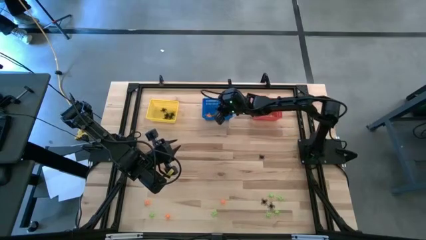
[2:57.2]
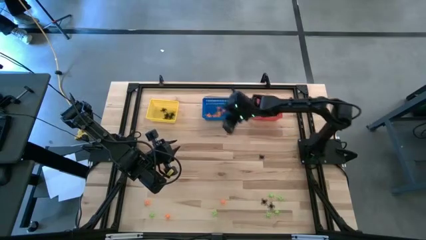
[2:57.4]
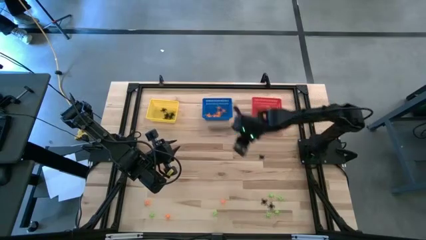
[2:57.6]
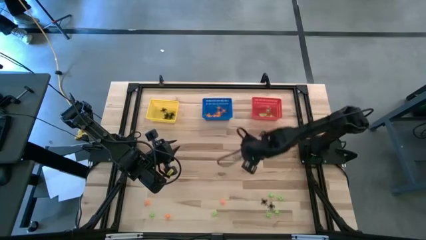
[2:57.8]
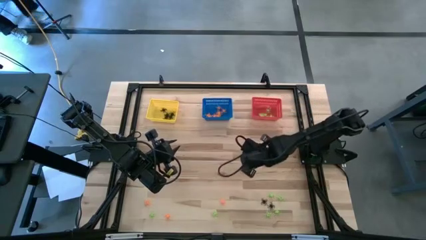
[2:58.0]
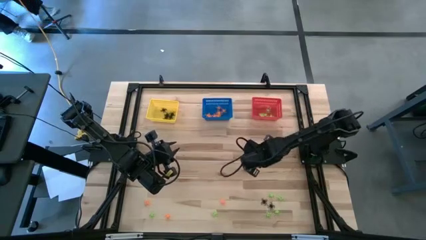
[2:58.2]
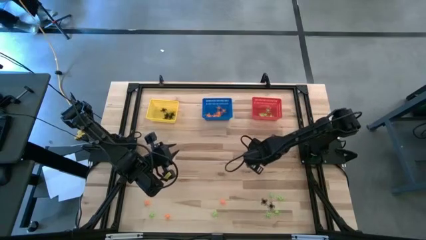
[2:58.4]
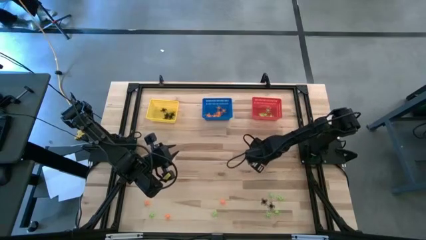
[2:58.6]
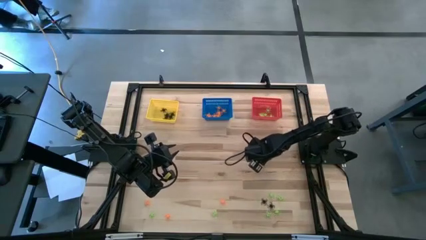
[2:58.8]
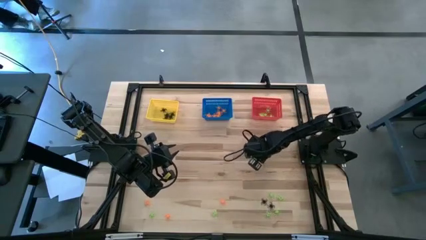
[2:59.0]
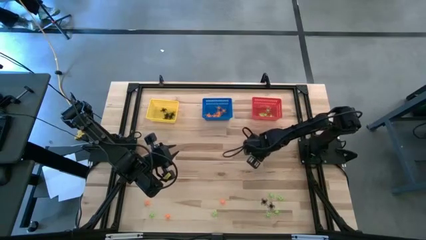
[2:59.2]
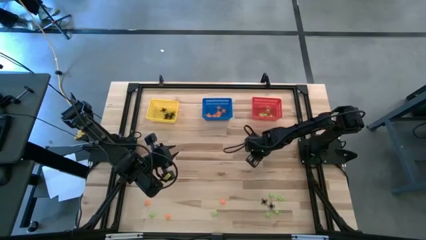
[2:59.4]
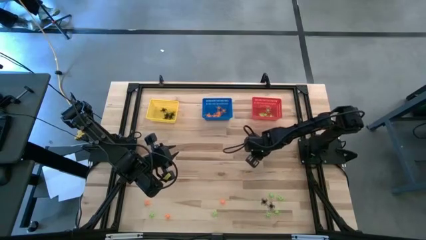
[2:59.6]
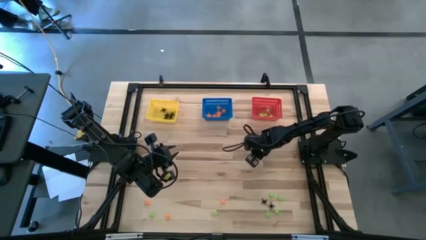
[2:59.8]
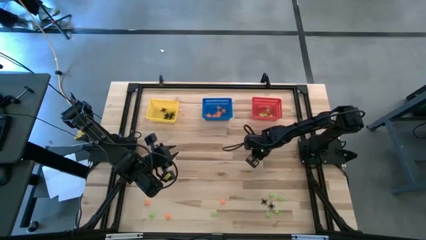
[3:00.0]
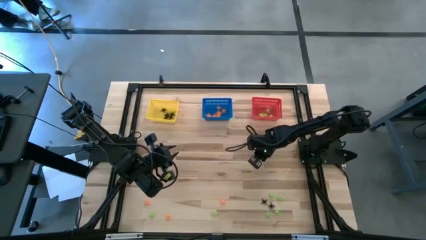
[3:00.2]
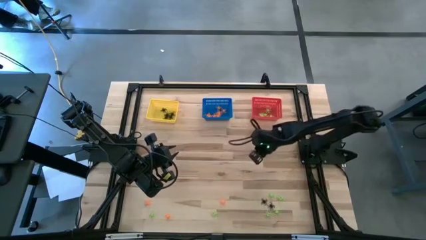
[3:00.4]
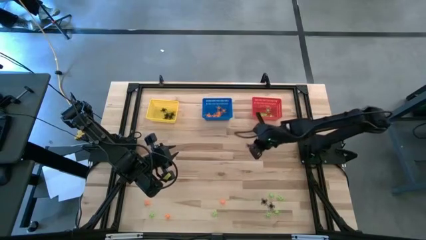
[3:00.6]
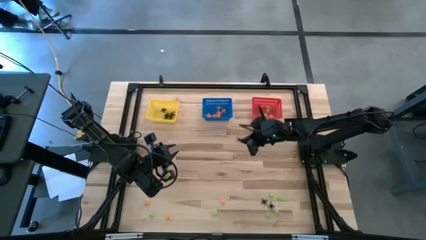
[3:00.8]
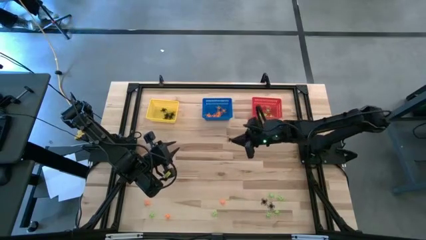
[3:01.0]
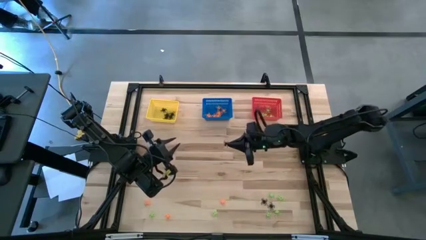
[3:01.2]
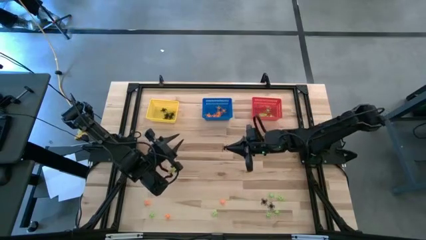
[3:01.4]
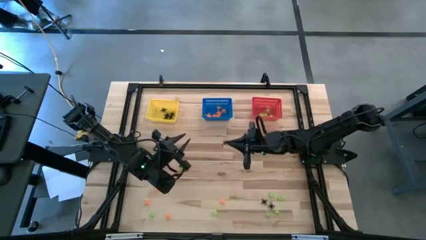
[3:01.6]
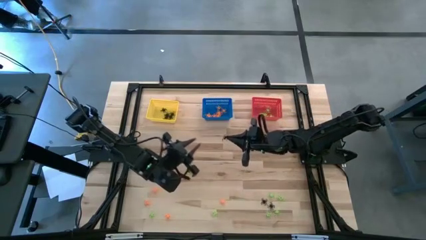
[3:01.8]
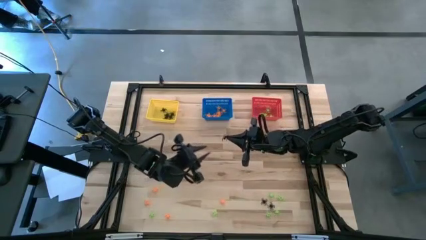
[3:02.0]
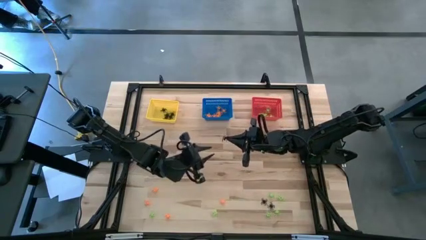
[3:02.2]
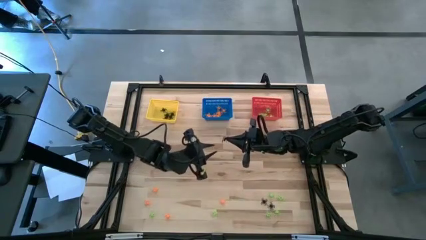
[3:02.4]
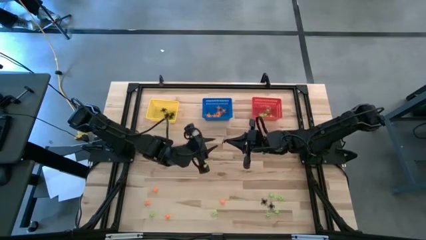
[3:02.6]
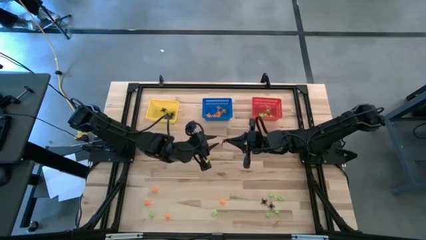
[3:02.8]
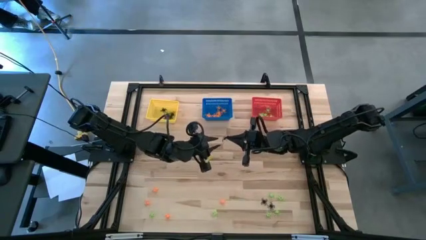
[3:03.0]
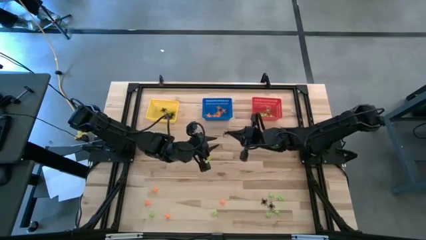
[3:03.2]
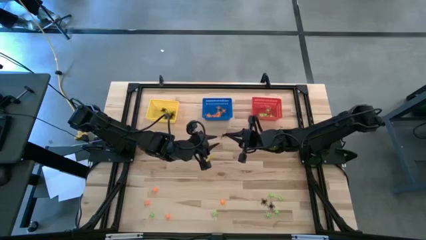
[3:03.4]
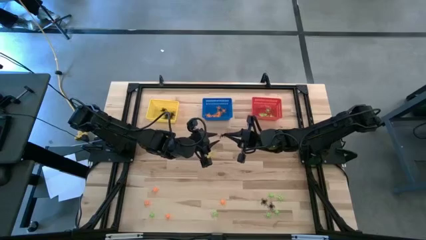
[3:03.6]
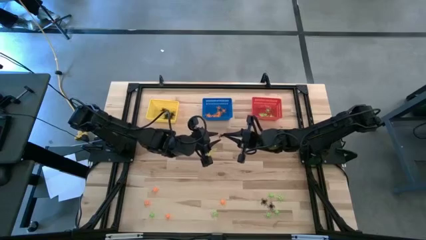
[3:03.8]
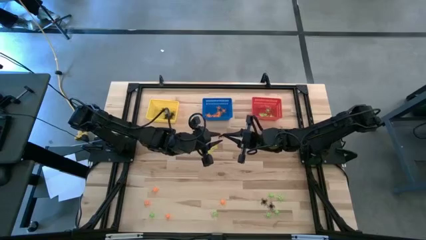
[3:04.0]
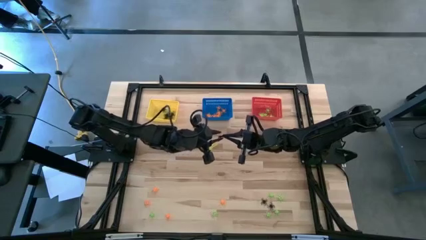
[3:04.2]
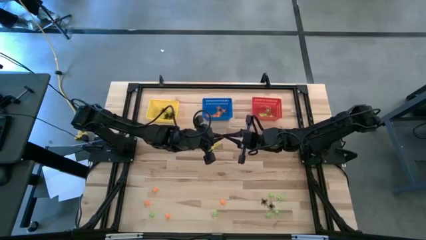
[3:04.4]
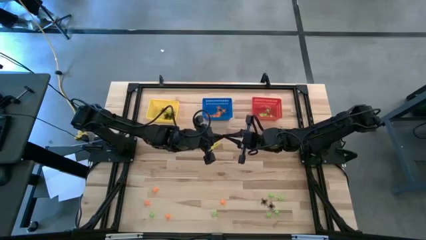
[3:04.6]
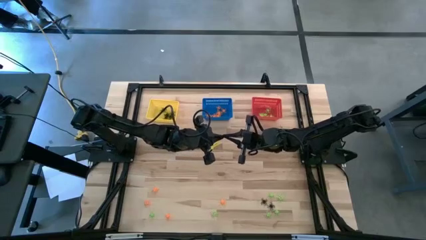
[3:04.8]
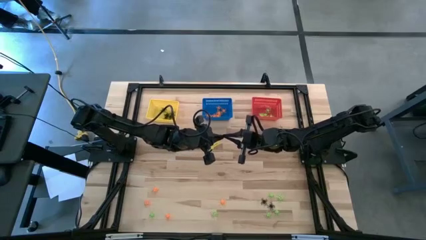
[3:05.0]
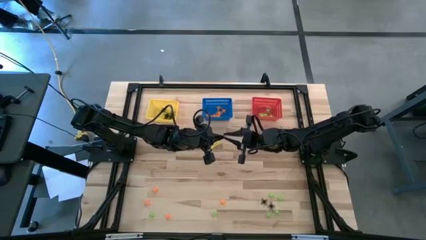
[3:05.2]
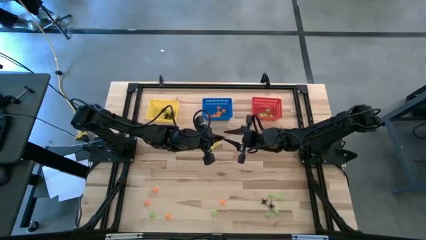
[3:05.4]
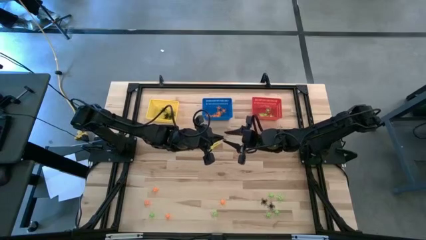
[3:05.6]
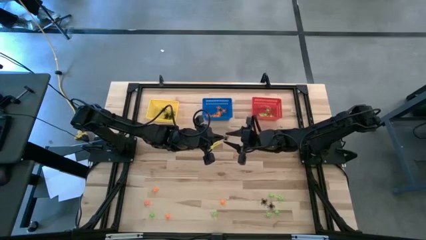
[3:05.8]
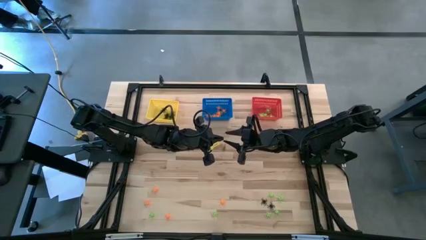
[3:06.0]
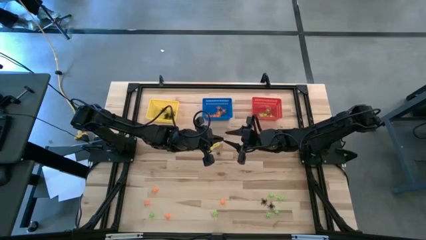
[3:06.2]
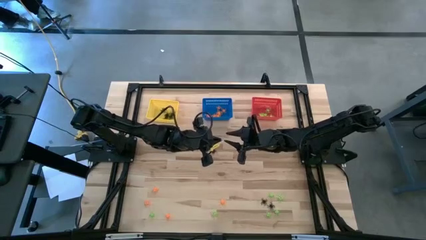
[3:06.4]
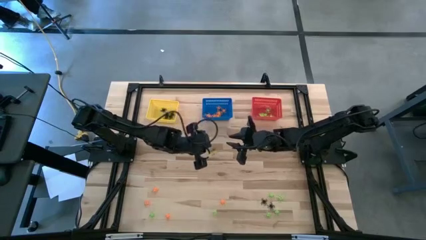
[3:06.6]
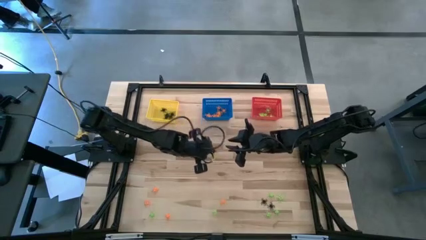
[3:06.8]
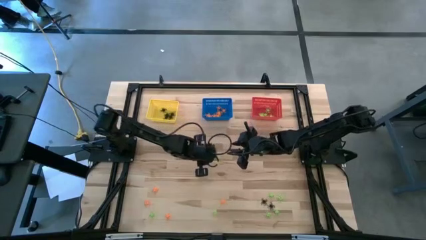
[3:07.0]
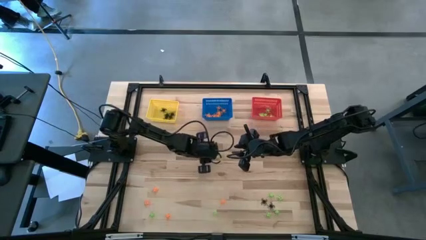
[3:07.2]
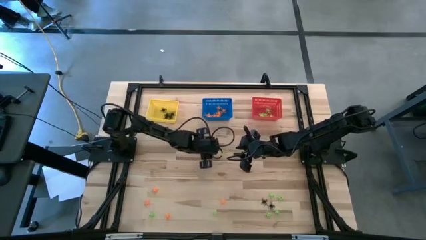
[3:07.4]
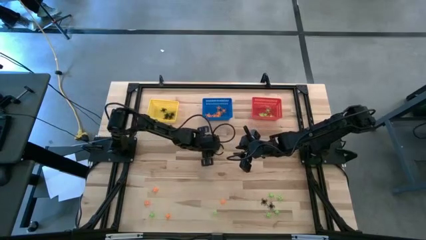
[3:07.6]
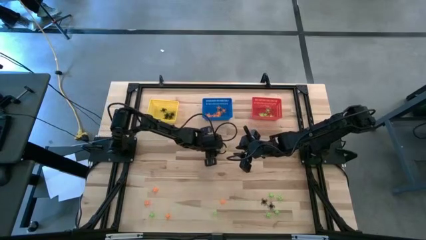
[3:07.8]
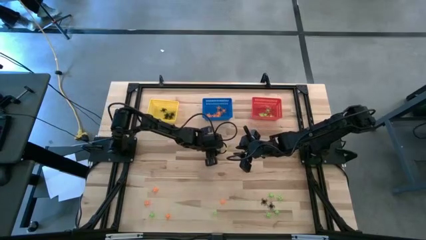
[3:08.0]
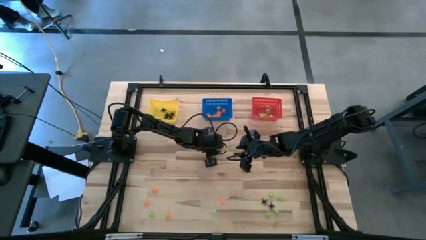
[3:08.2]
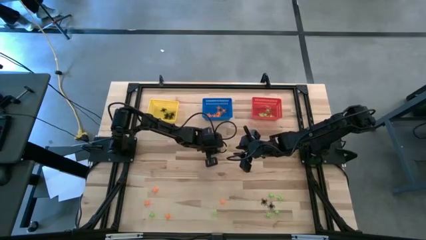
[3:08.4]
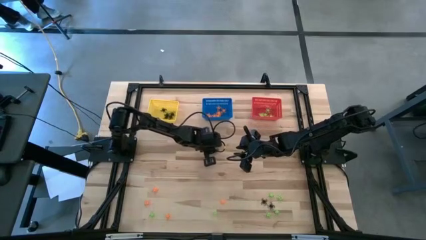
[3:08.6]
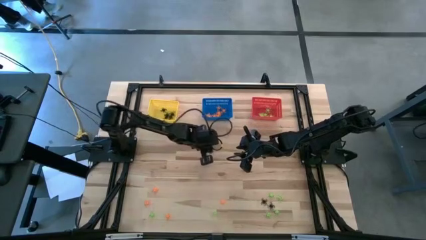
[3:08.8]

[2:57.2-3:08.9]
Task: Sort Halloween decoration
Put the black spider toy into the yellow basket

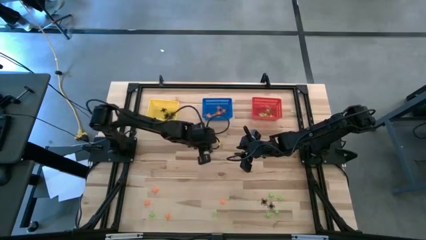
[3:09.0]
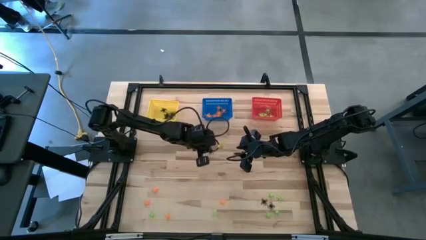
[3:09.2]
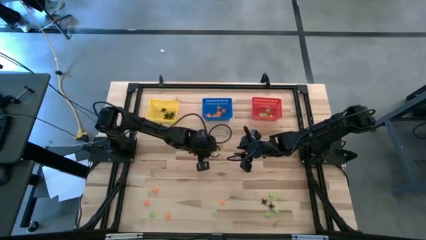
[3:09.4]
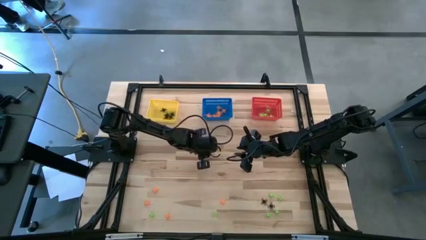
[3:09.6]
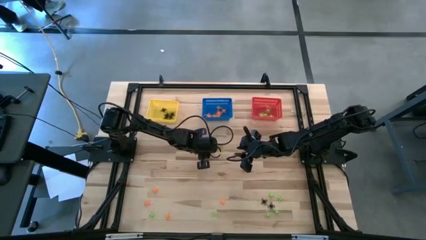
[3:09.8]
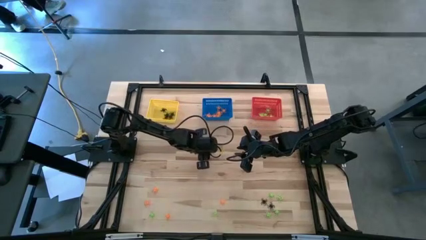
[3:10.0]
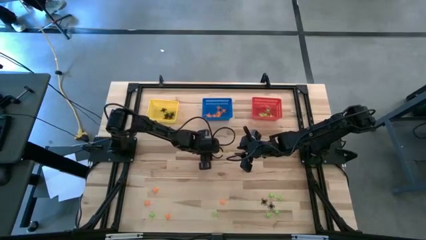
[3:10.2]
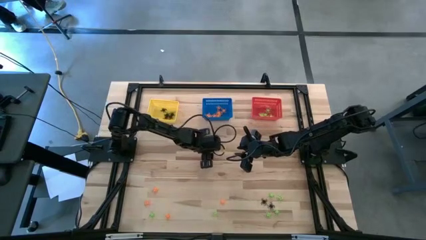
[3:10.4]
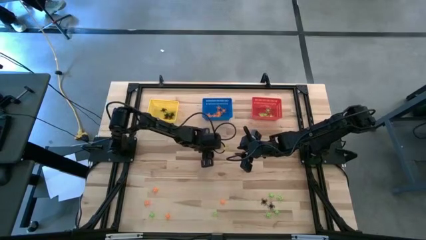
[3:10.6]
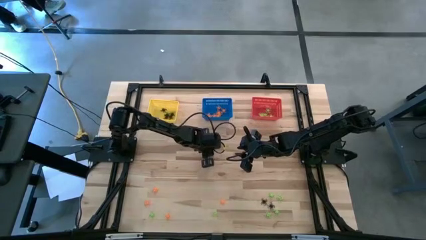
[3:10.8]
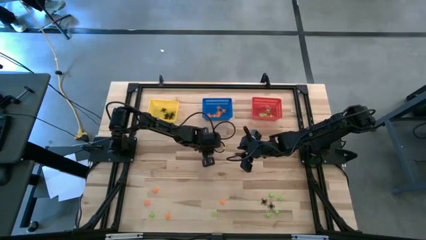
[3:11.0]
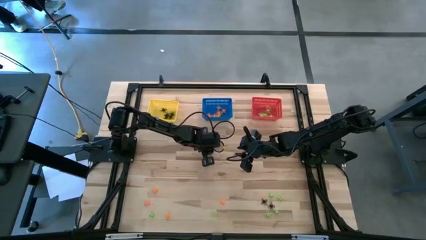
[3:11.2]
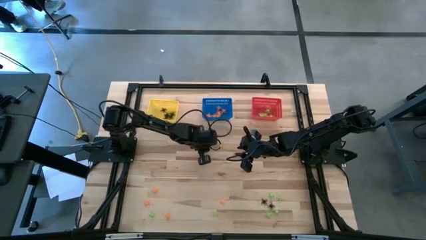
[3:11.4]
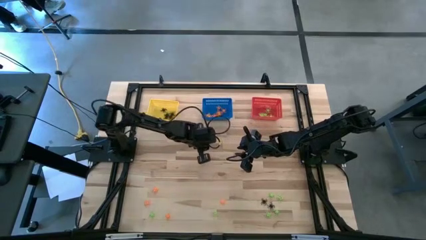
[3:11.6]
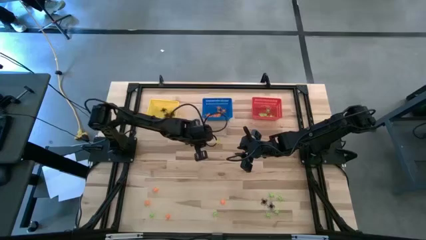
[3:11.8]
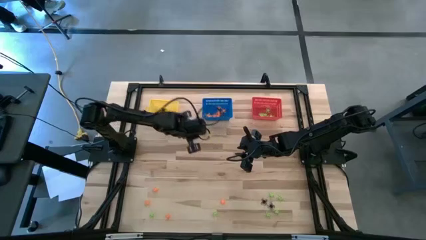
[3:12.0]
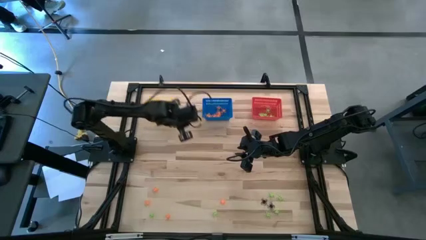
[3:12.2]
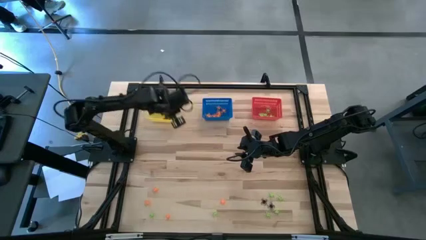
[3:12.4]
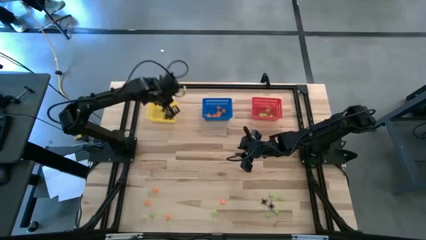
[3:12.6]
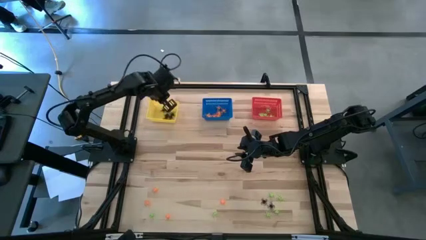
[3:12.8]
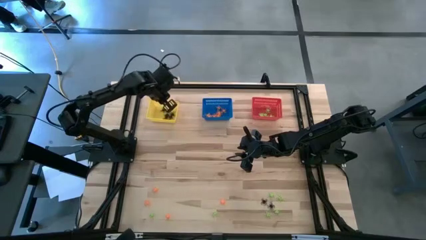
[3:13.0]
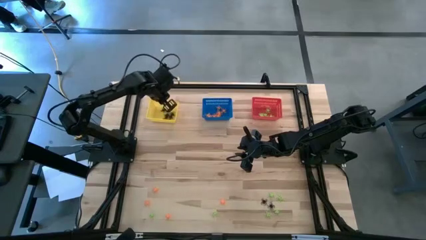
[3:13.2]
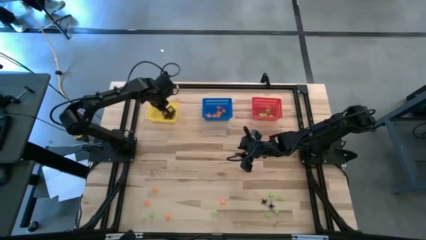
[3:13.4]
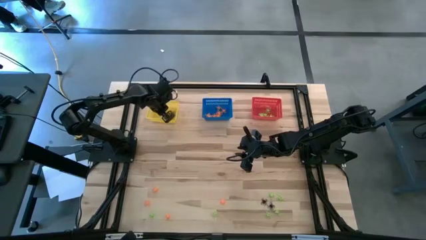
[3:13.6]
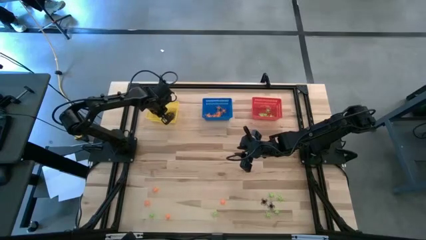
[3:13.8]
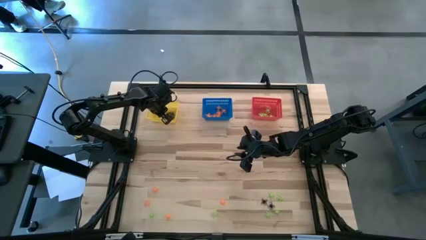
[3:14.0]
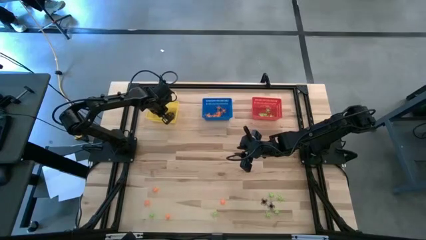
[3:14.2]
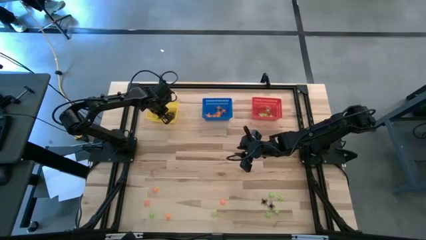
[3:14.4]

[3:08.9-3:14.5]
Put the black spider toy into the yellow basket
